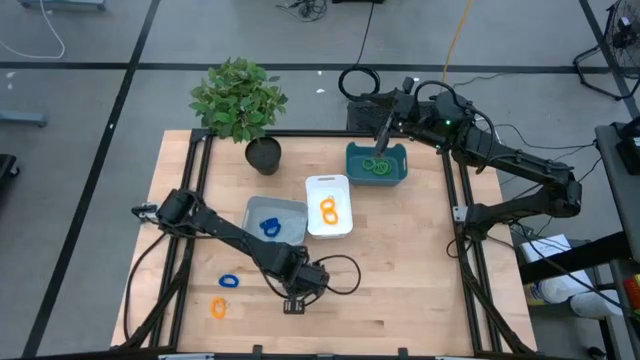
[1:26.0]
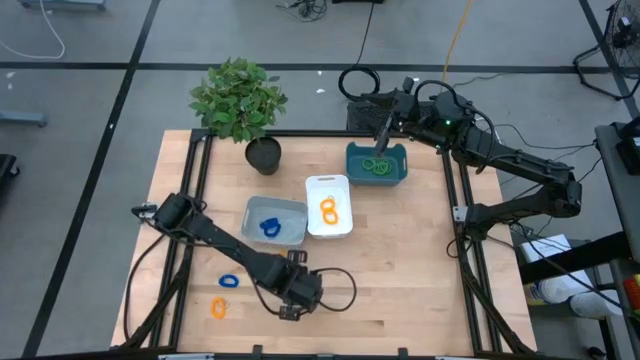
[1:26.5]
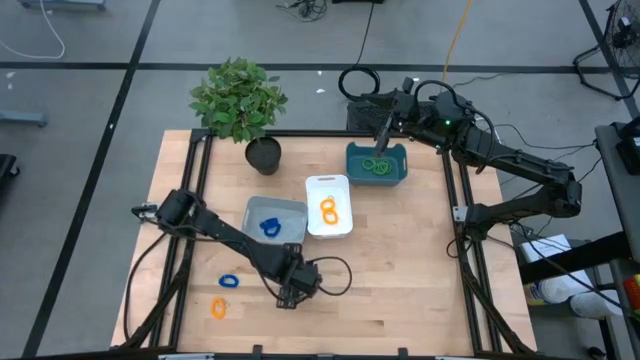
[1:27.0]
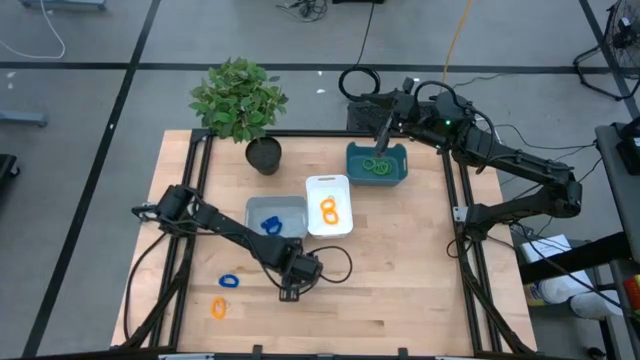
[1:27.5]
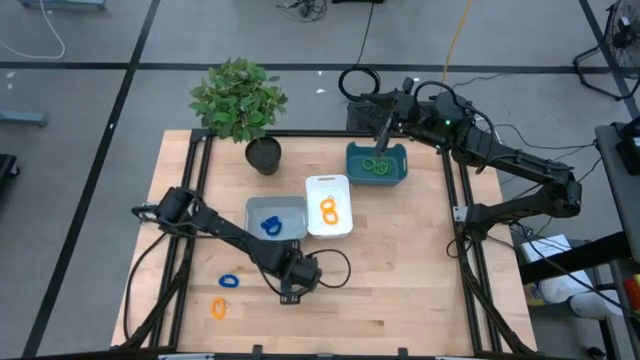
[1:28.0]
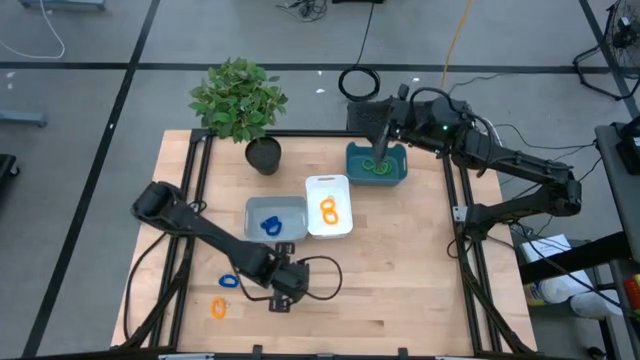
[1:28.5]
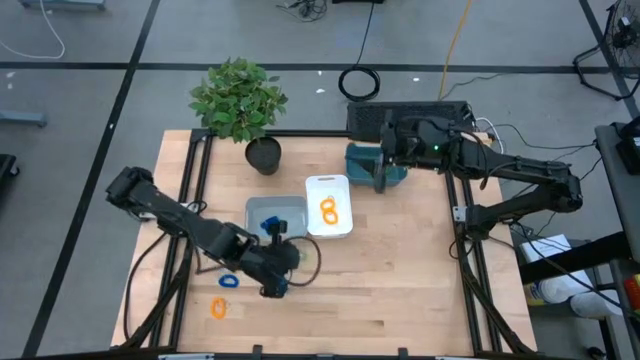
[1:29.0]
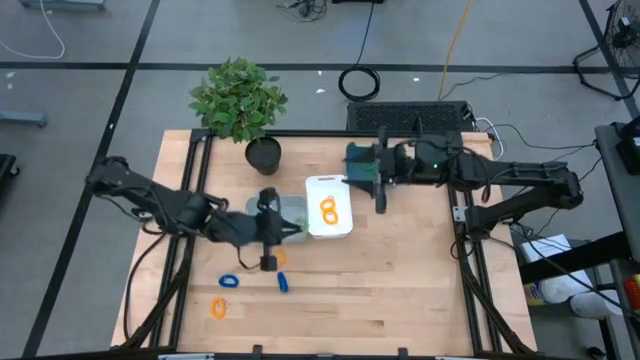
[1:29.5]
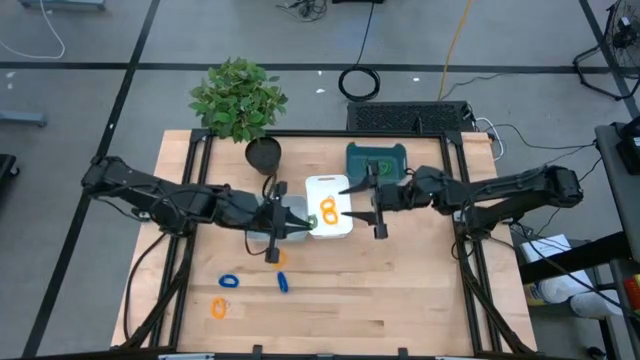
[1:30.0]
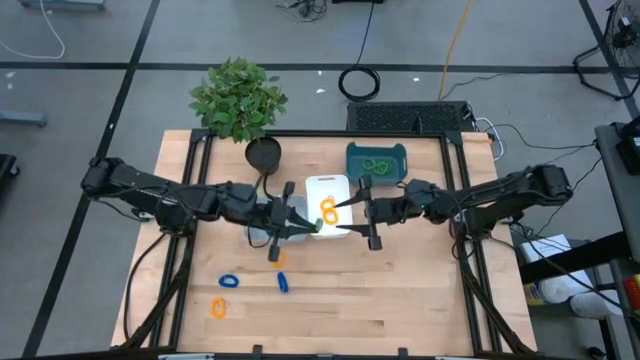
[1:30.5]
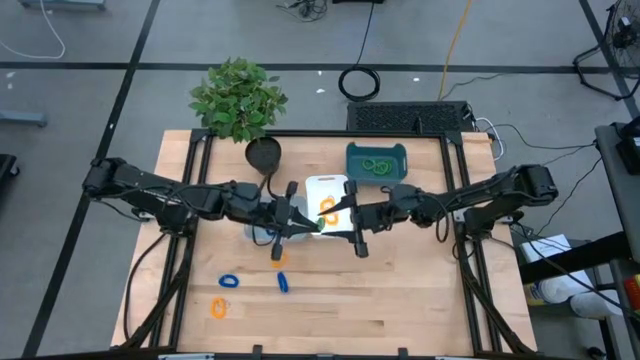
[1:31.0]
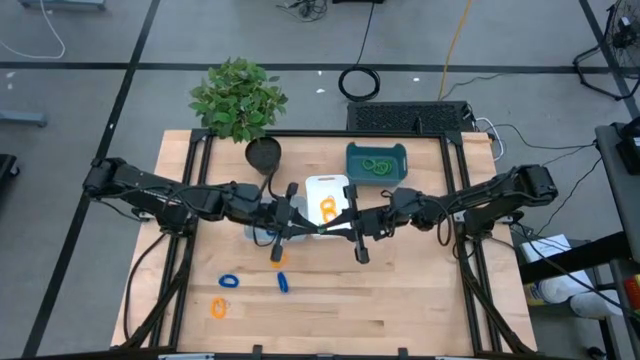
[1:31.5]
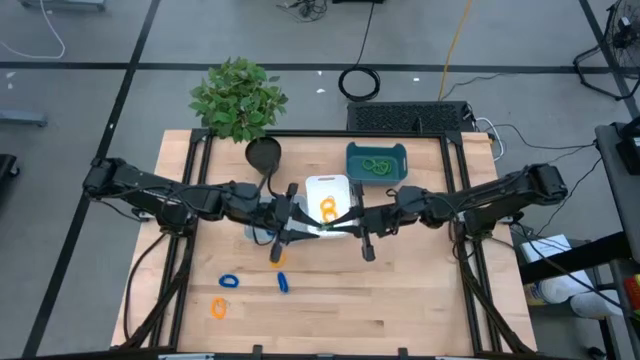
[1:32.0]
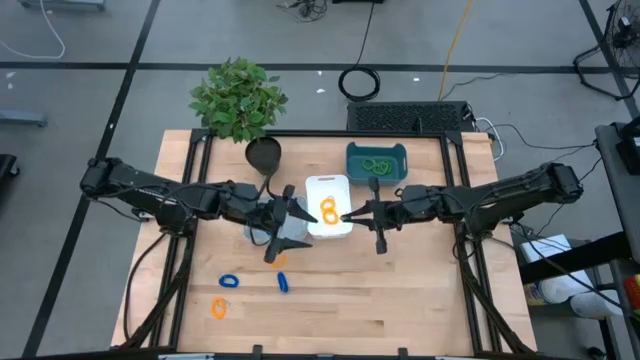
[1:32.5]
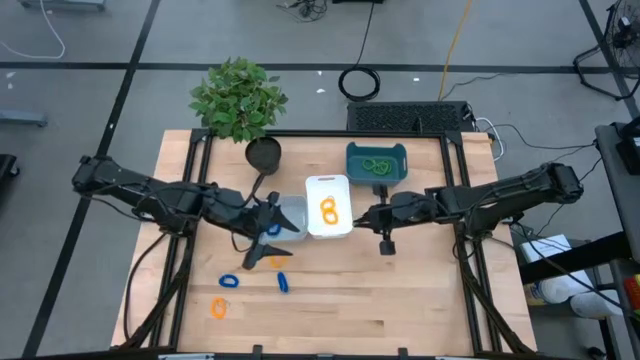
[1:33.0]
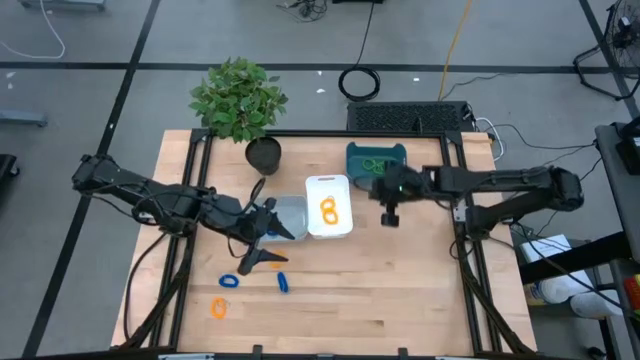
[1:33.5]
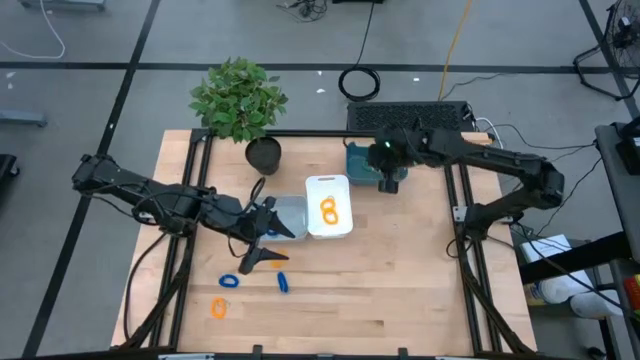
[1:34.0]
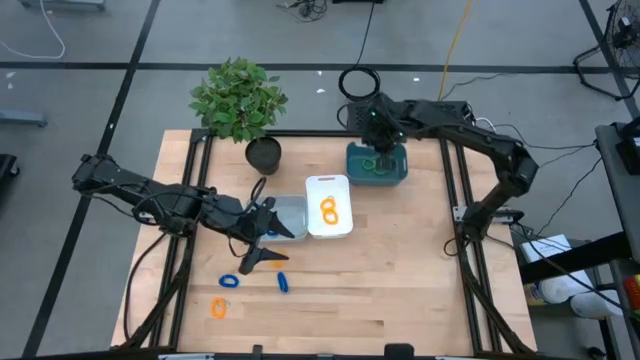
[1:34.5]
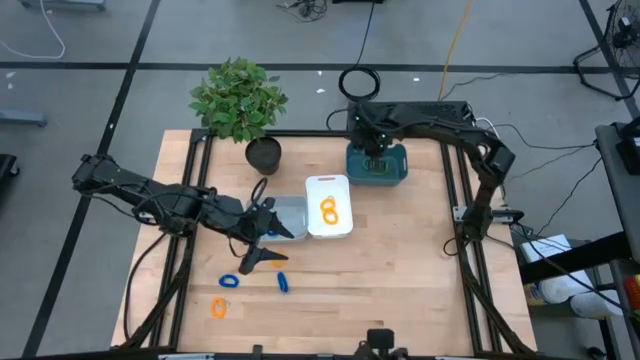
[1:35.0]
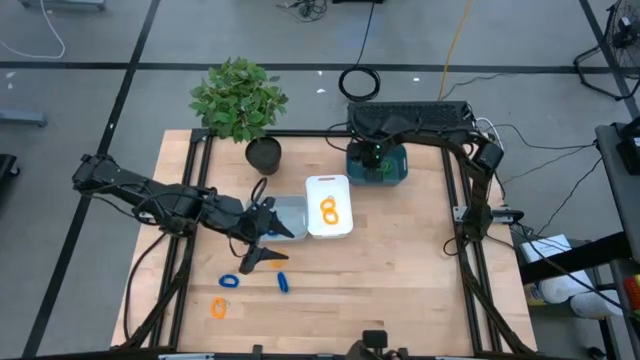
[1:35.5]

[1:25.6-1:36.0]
Task: Sort spring keychains
Put the green spring keychain into the blue bin

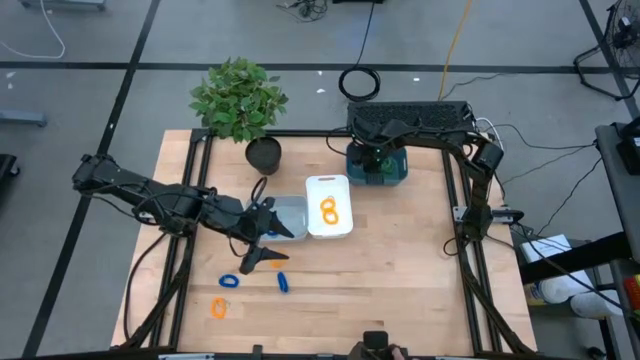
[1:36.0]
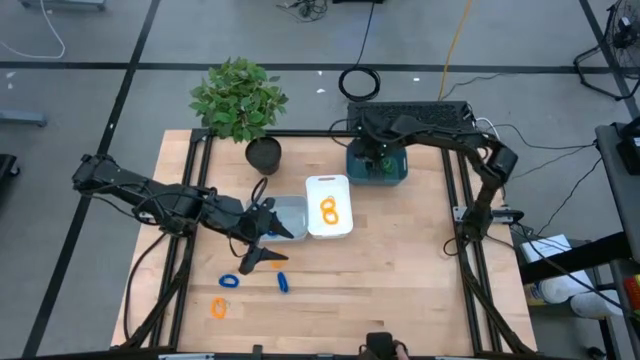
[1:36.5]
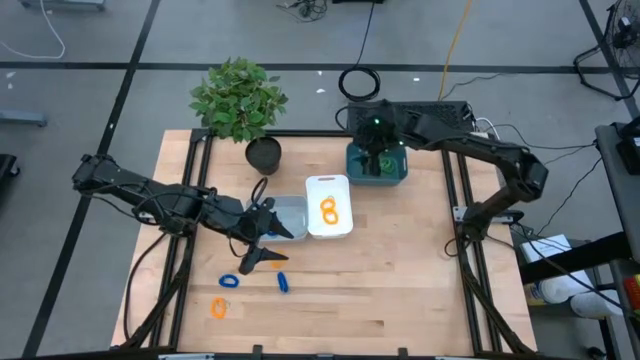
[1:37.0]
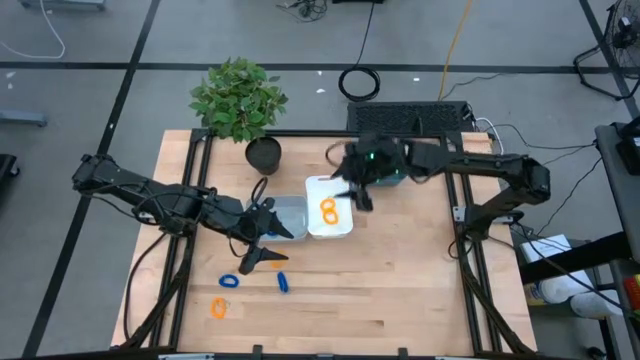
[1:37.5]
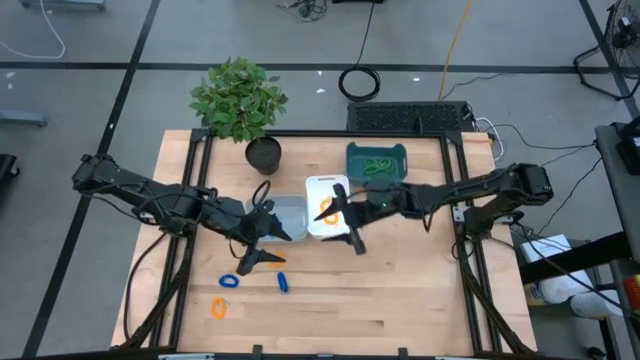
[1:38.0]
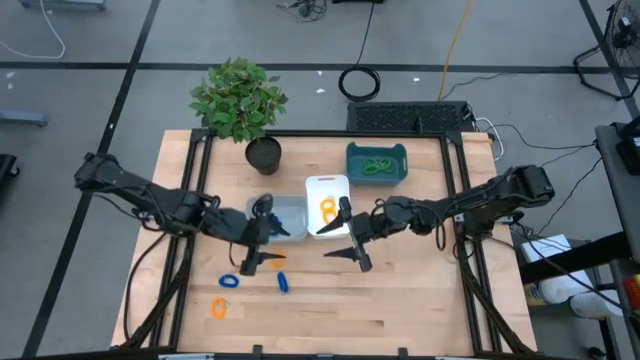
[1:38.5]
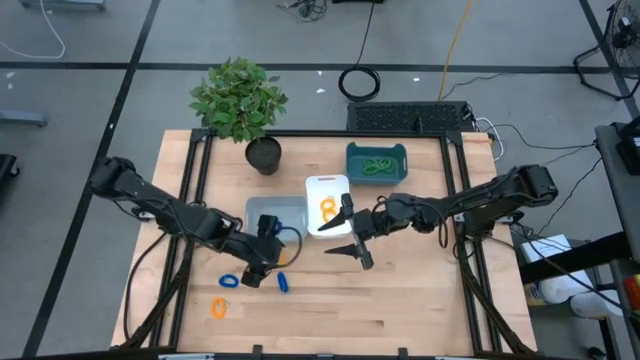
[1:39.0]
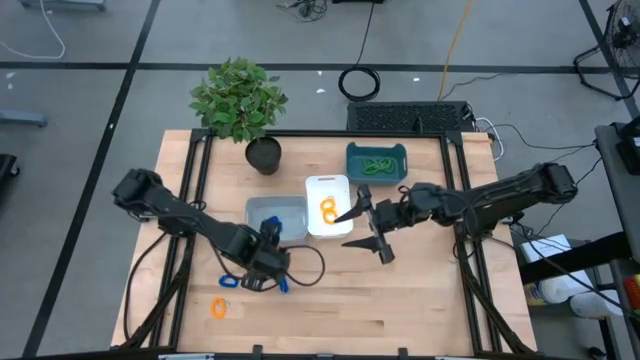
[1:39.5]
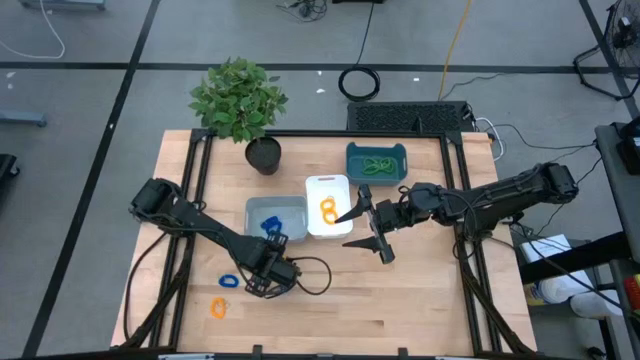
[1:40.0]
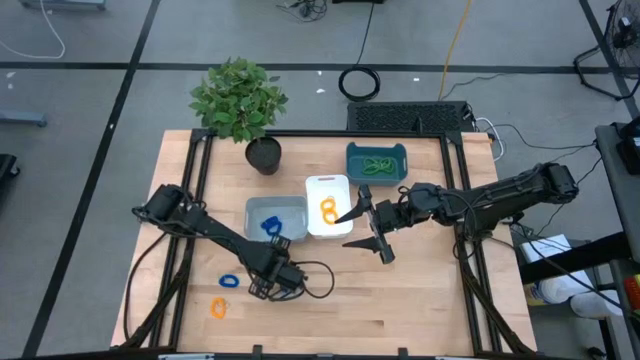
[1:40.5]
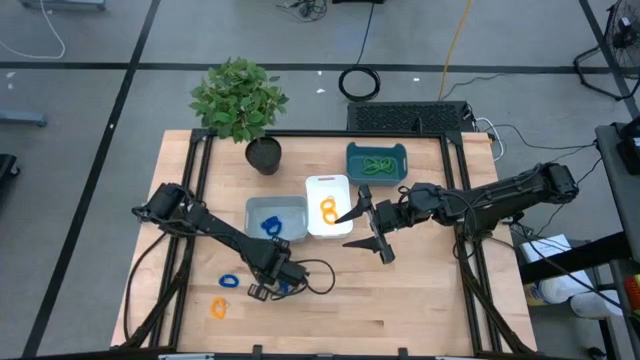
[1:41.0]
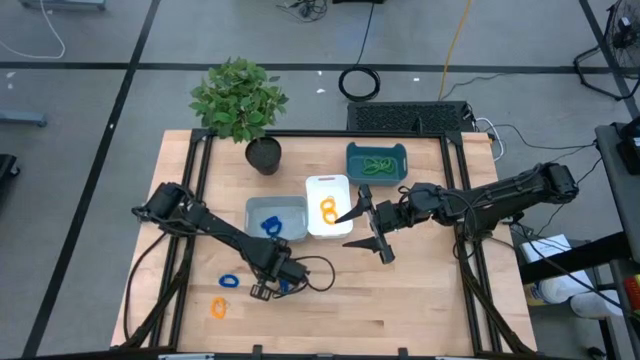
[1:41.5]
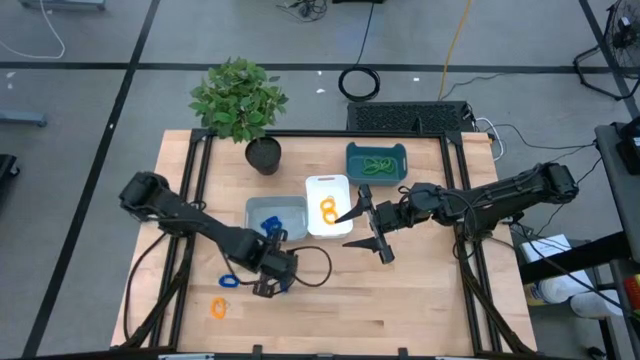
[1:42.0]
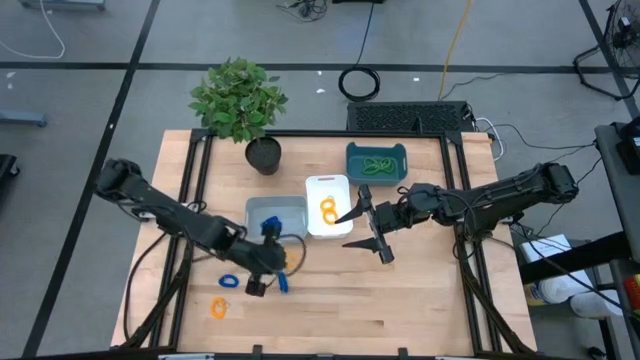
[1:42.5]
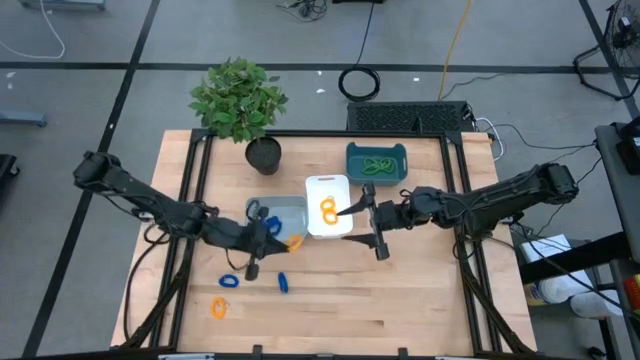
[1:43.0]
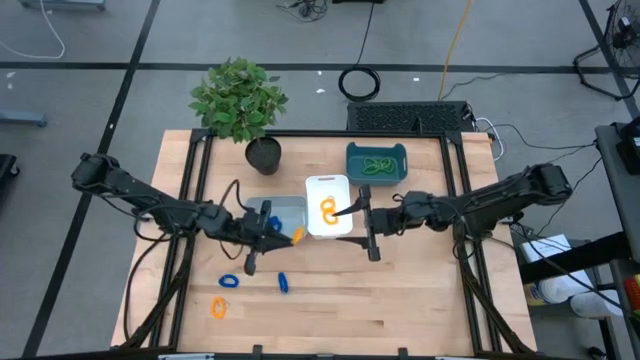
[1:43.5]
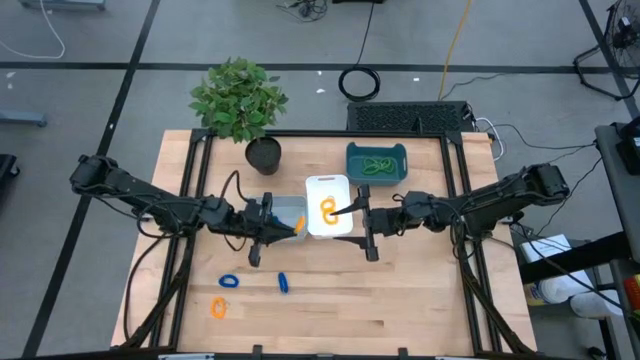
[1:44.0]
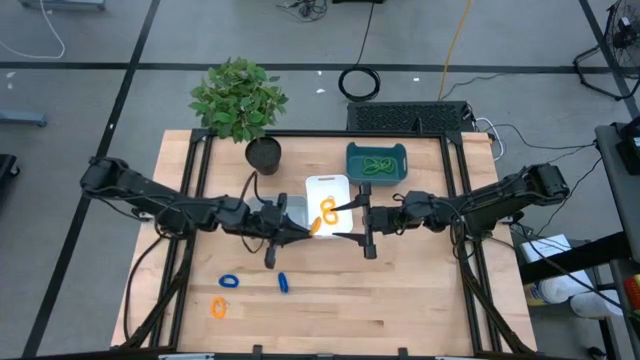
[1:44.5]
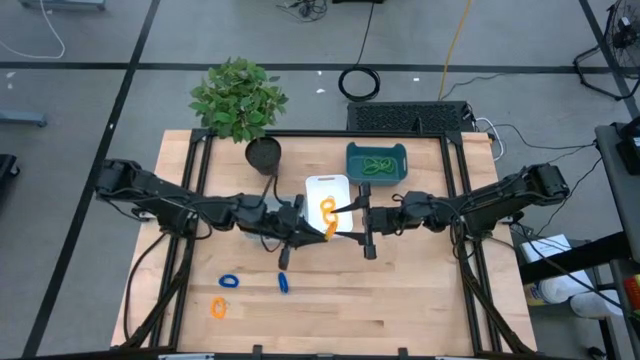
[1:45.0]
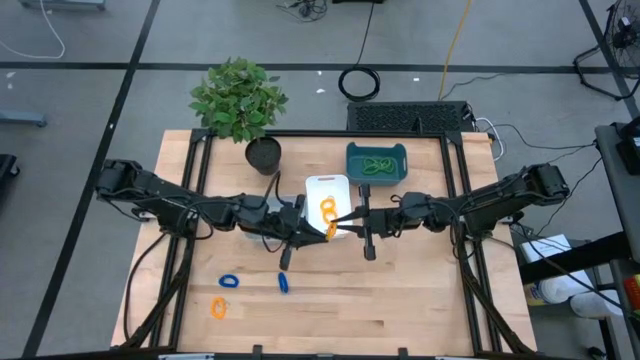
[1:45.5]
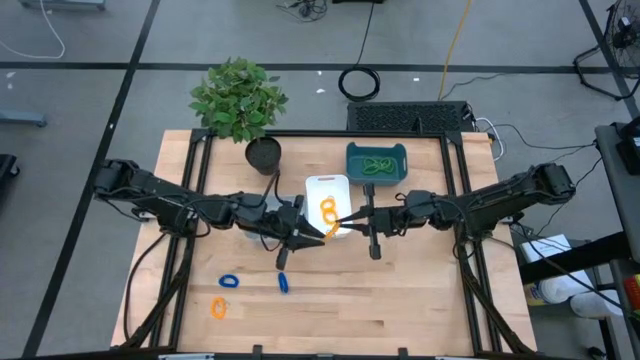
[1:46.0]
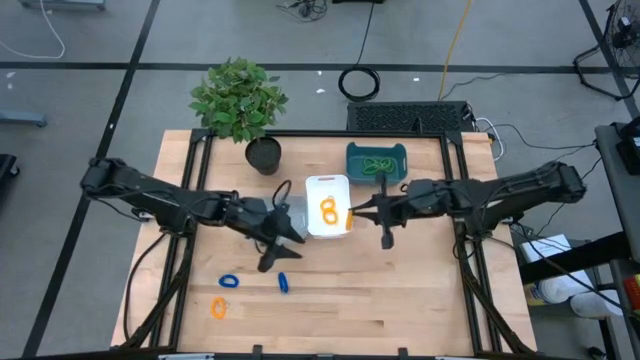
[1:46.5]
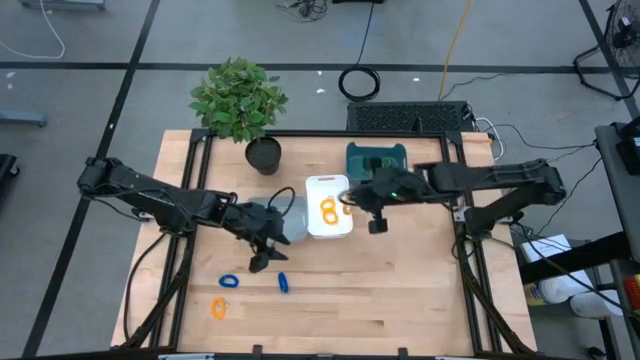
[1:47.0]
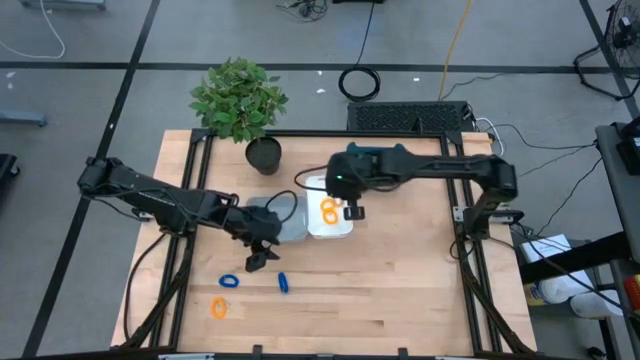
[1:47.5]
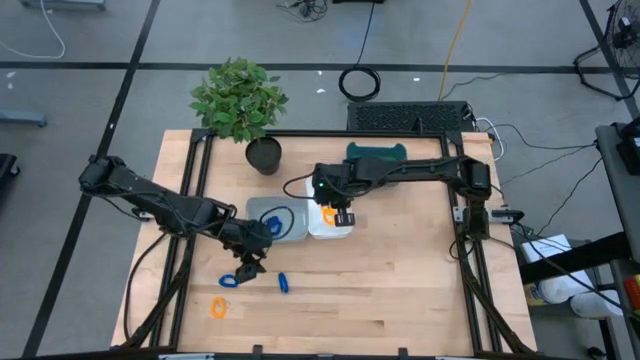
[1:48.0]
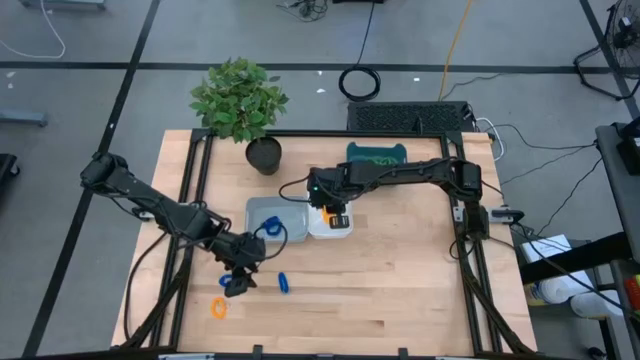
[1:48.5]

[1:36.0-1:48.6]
Put the yellow spring keychain into the white bin
